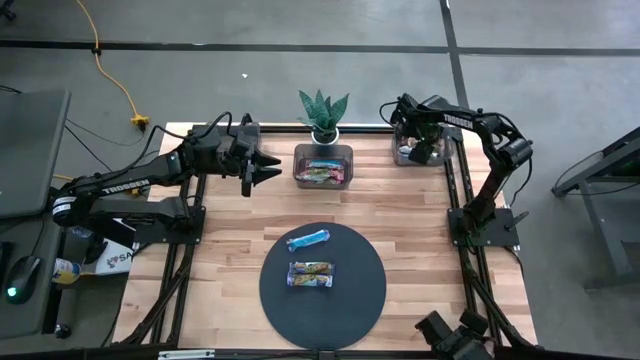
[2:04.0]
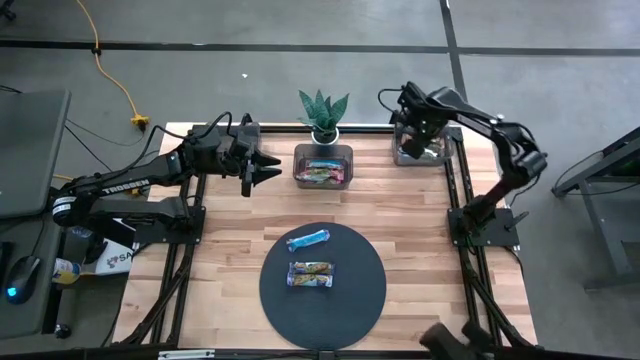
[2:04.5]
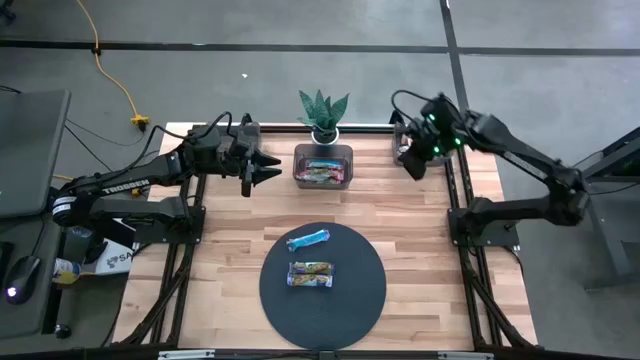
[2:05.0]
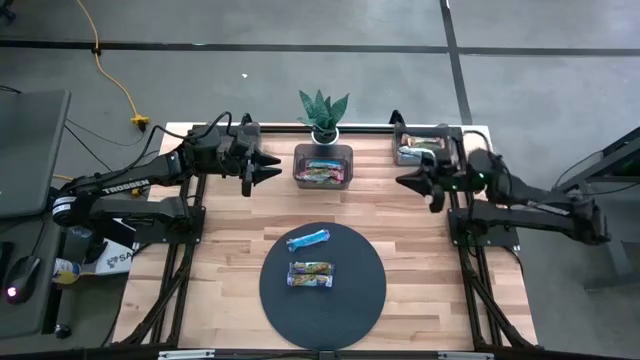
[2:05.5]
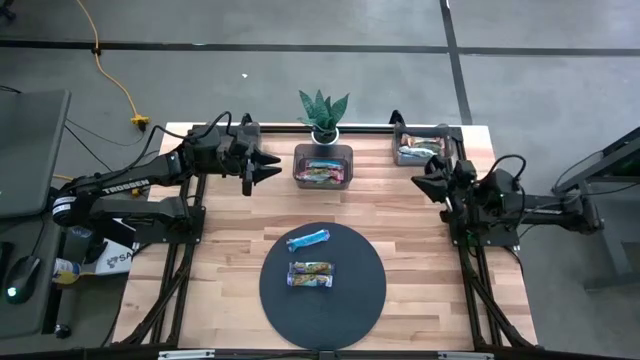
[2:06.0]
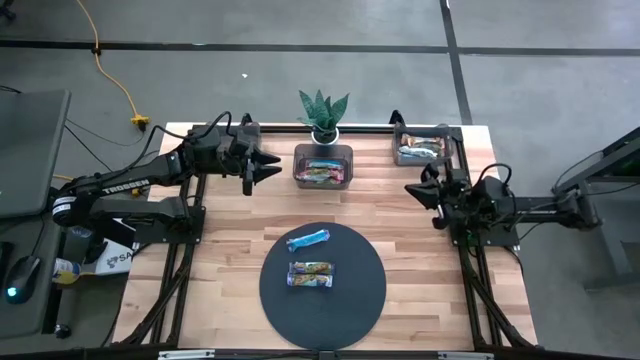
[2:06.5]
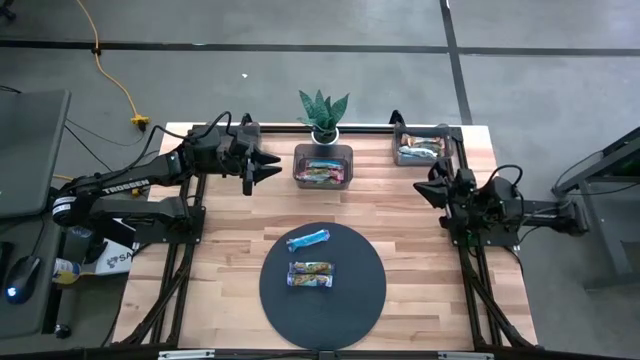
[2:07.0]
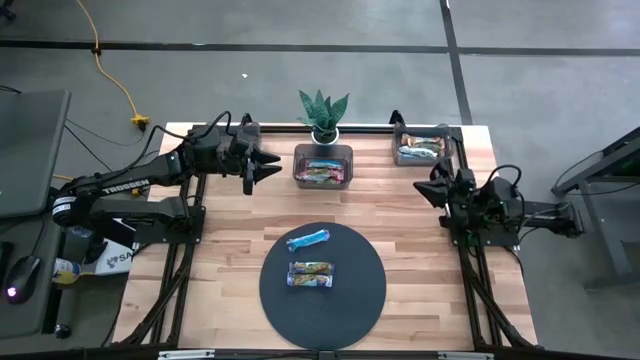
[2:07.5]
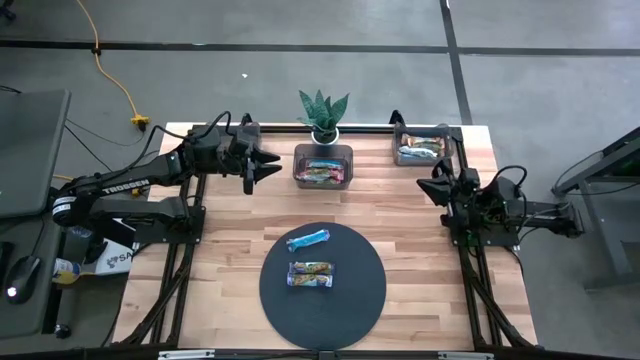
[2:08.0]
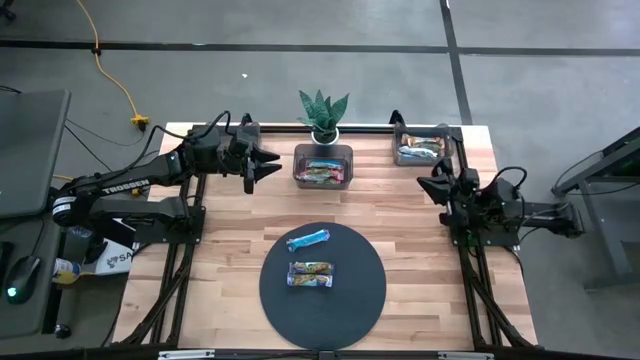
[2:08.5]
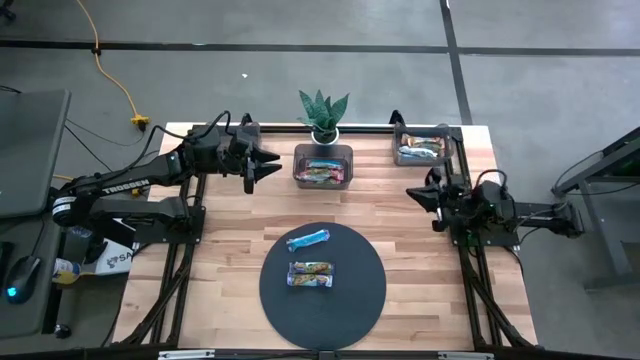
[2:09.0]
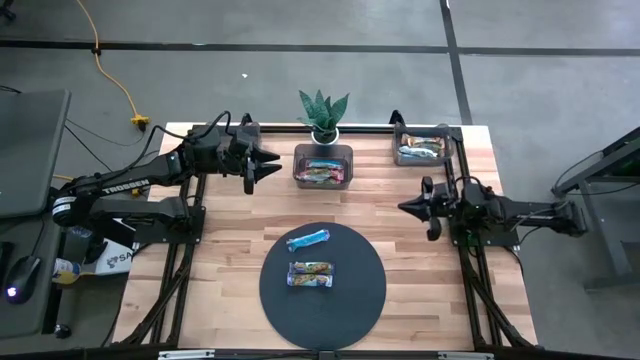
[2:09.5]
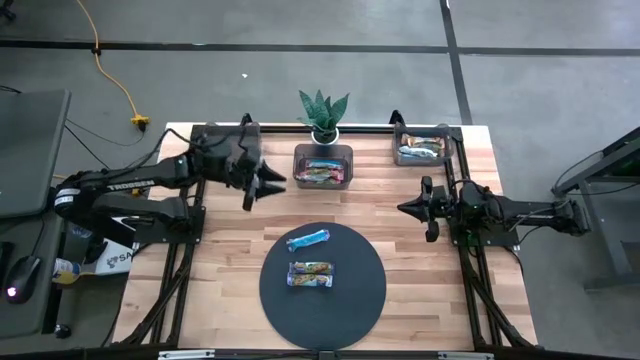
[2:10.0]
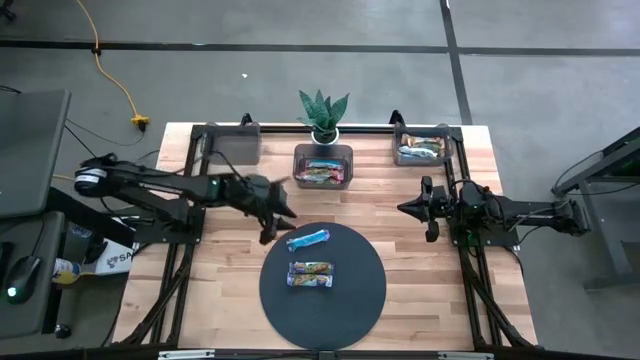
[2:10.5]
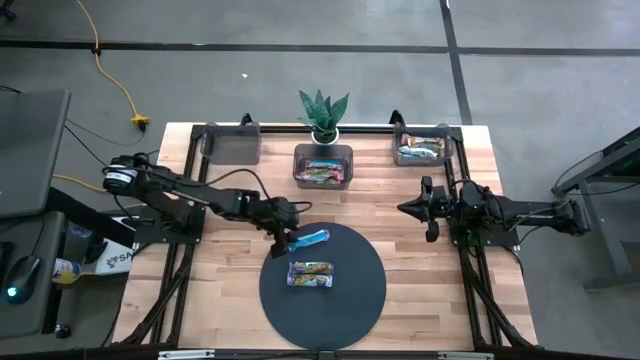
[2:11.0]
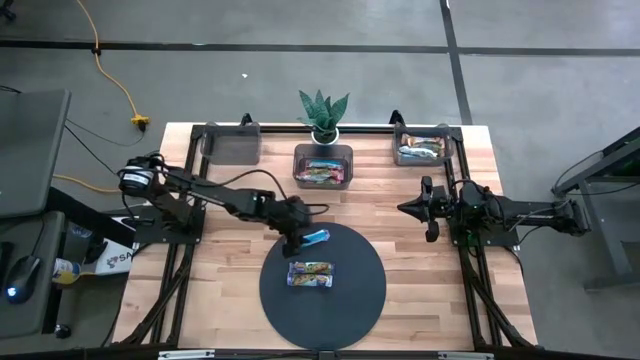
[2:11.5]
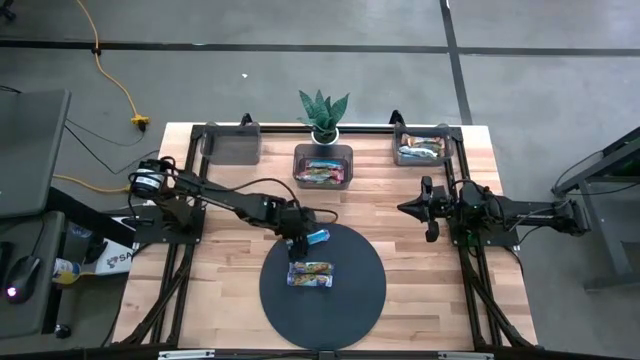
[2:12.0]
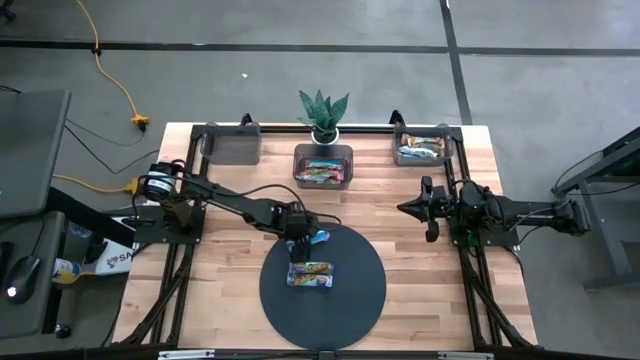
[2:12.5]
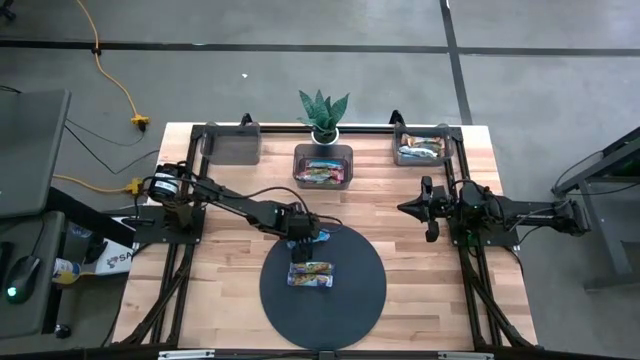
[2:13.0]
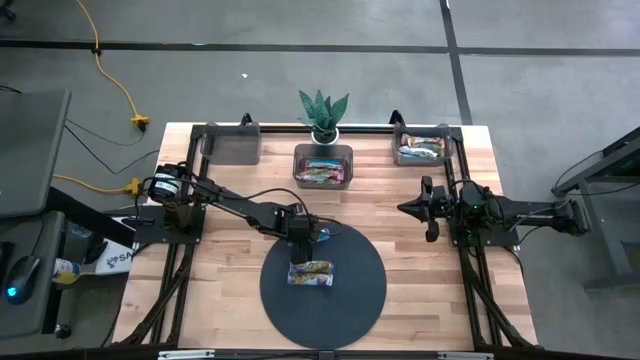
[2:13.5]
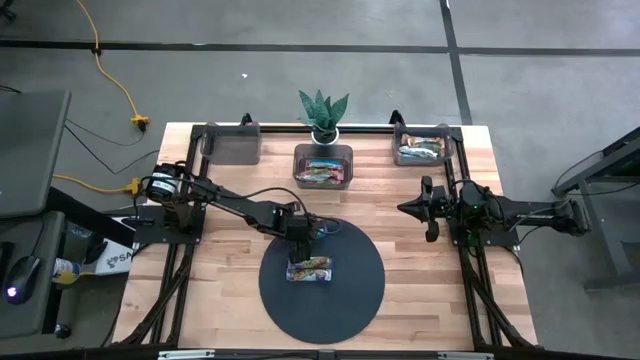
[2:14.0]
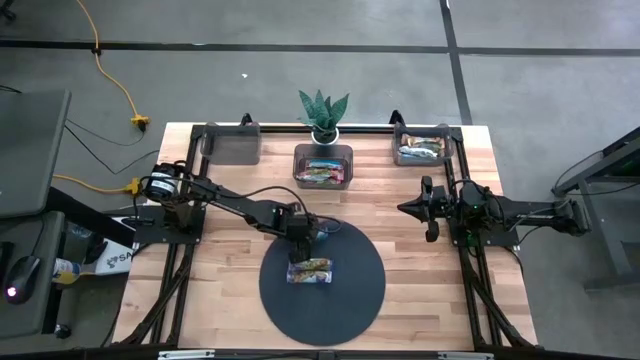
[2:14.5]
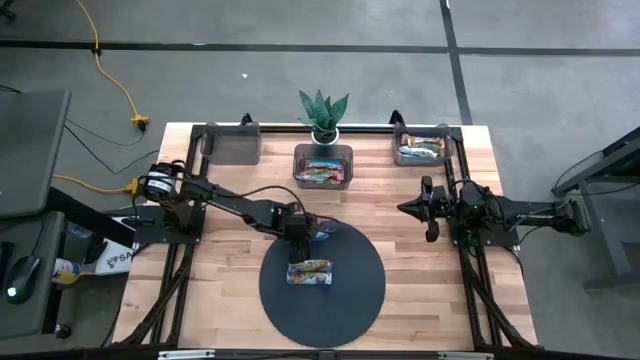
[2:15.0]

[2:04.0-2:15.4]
Task: Pick and place Granola Bars by type
Put the blue granola bar into the left black bin

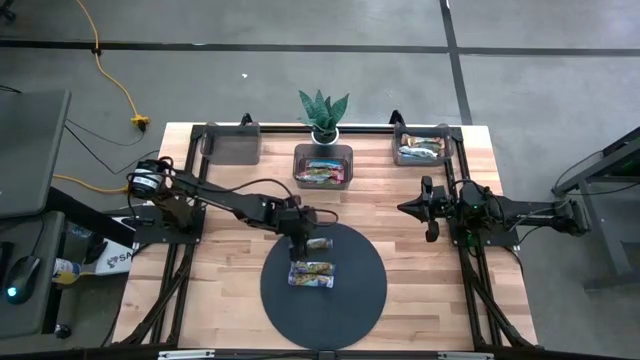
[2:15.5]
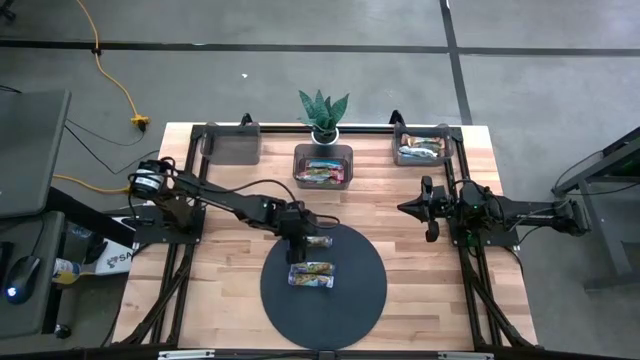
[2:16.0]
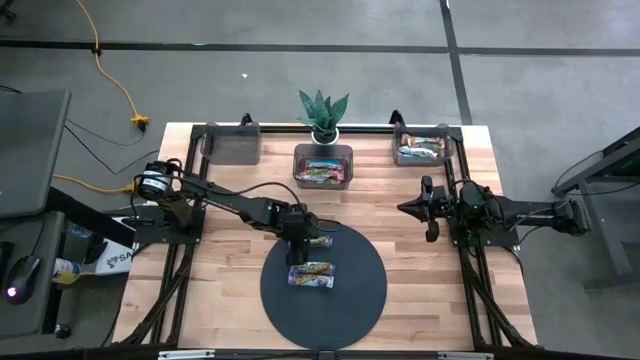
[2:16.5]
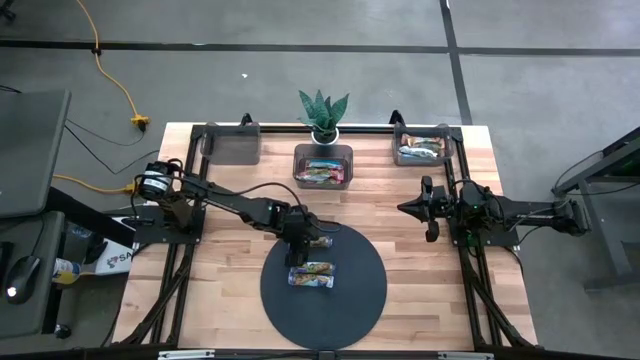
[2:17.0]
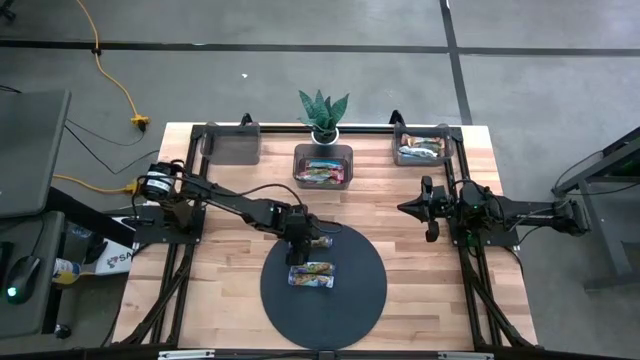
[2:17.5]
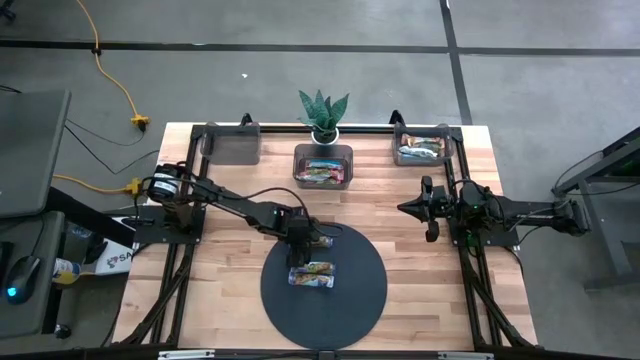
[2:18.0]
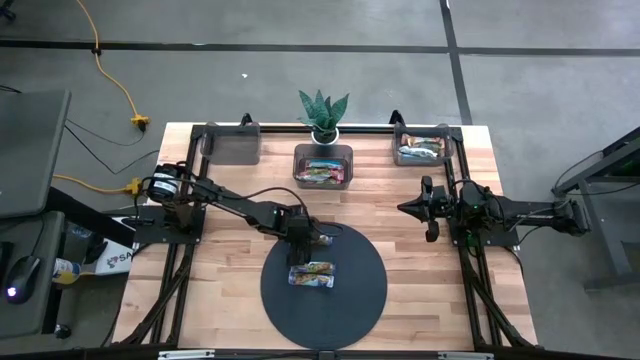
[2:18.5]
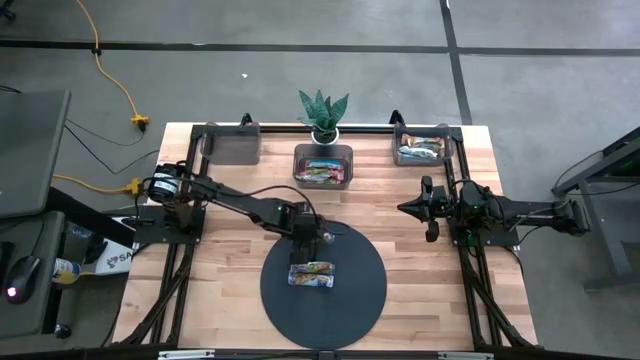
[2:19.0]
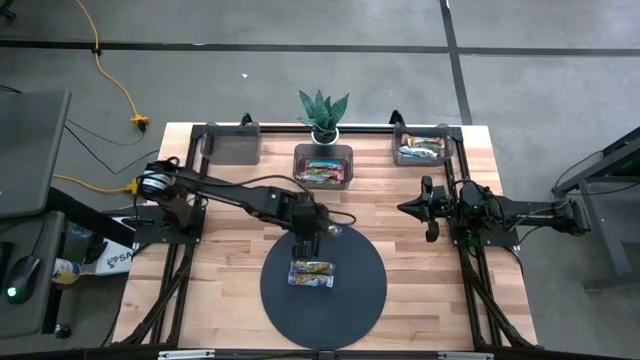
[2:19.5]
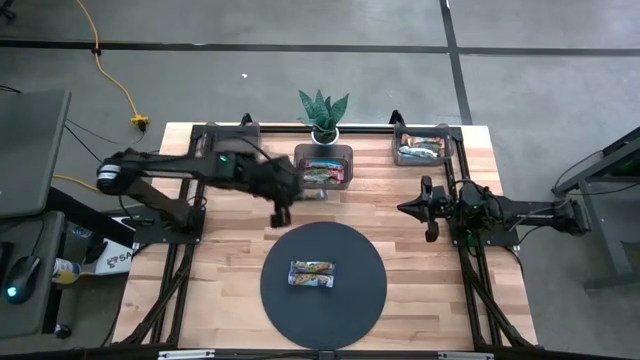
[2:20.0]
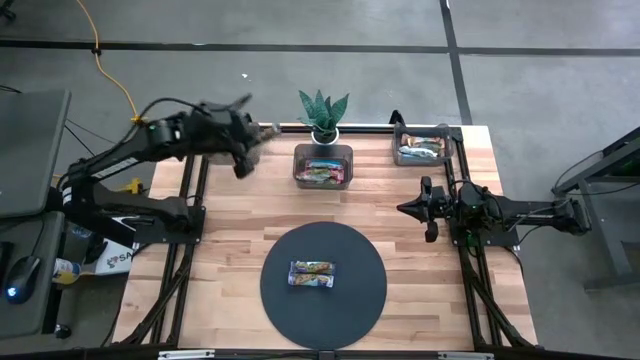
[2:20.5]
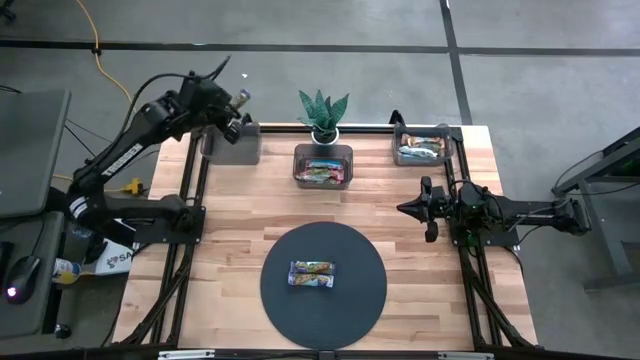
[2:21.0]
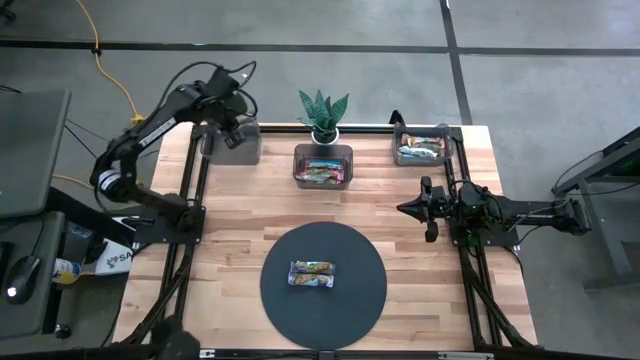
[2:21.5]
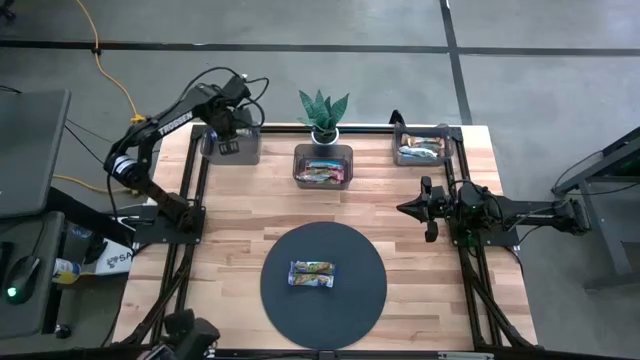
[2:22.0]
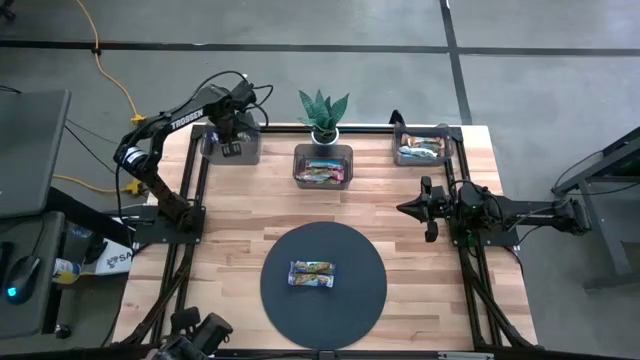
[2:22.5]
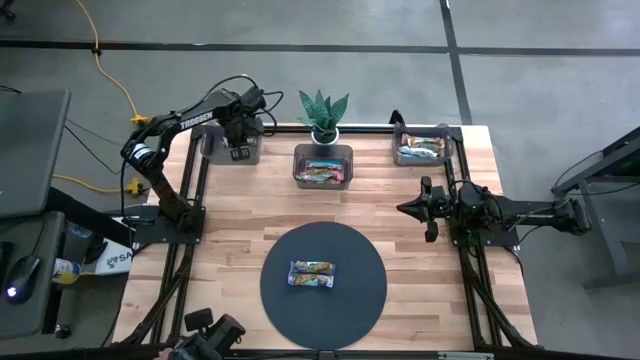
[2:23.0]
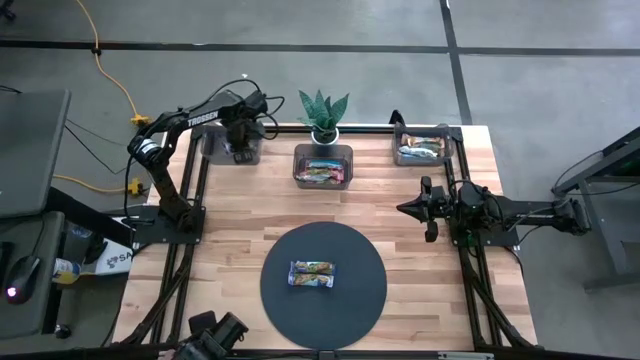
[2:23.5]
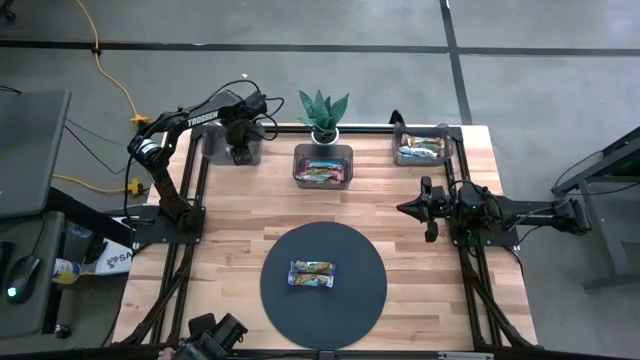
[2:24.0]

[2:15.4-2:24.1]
Put the blue granola bar into the left black bin

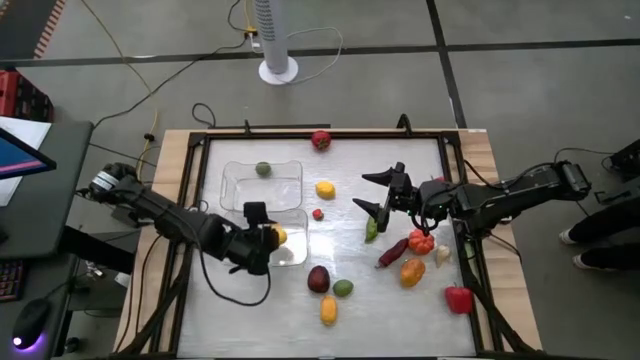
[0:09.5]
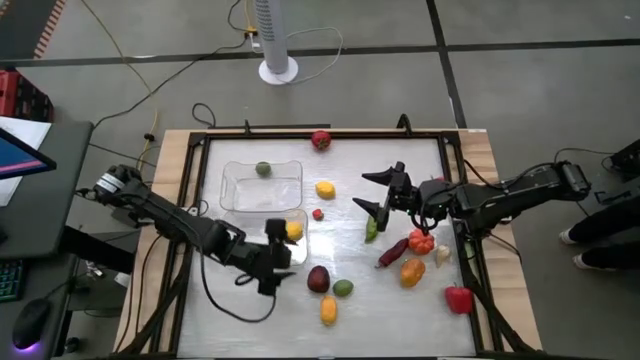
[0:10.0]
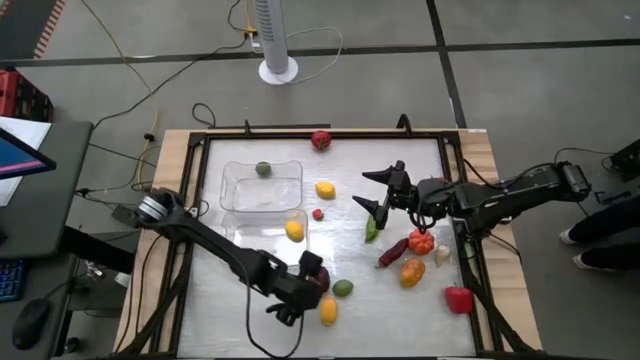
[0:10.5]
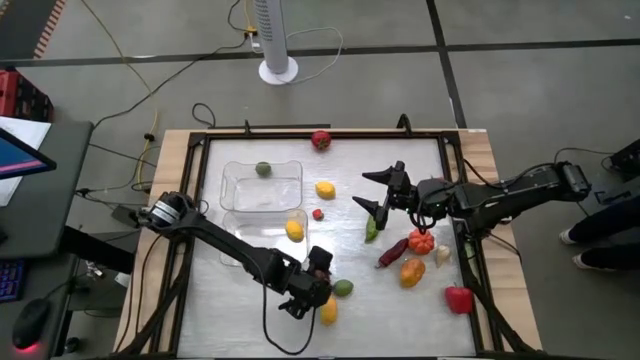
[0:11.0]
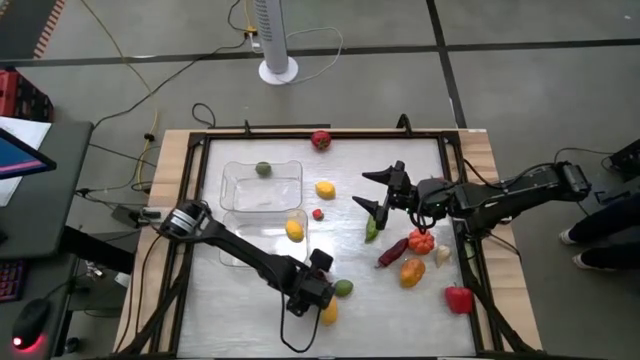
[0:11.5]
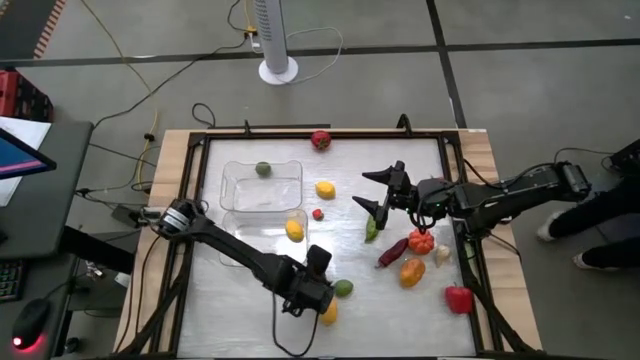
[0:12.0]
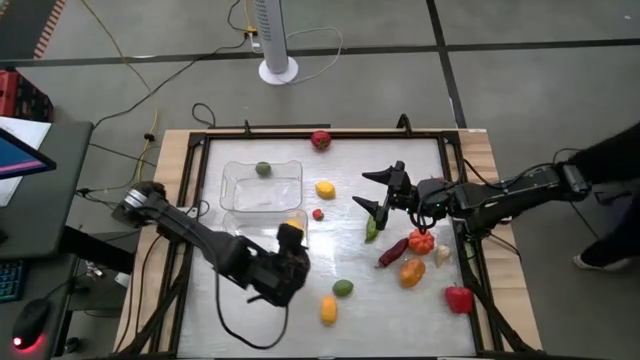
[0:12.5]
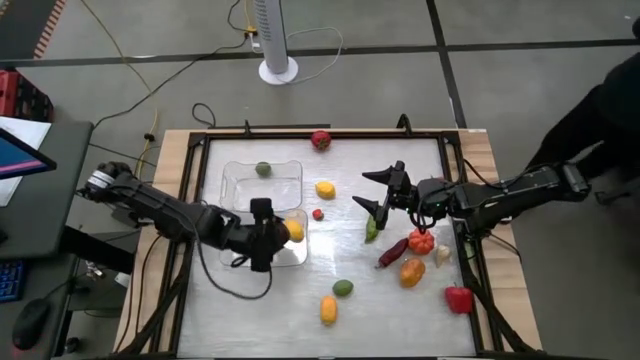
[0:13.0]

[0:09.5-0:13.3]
Task: Sort produce into baskets
Put the bottom red apple into the bottom transparent bin
